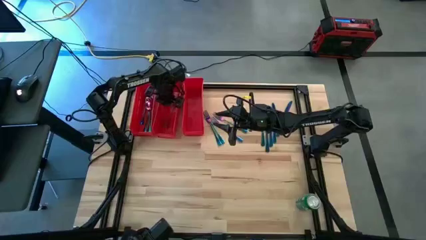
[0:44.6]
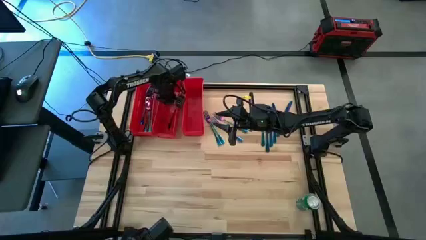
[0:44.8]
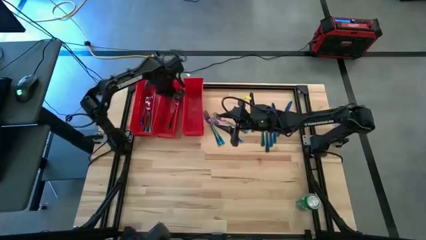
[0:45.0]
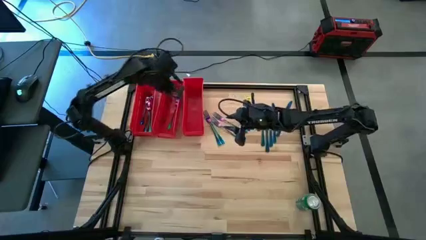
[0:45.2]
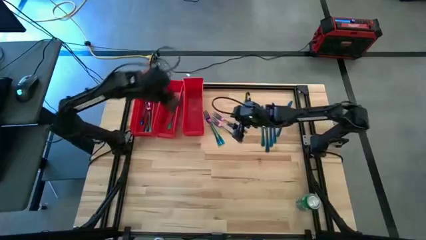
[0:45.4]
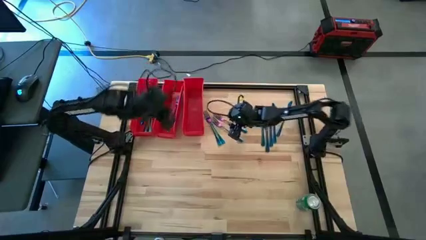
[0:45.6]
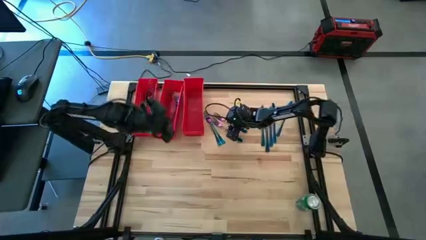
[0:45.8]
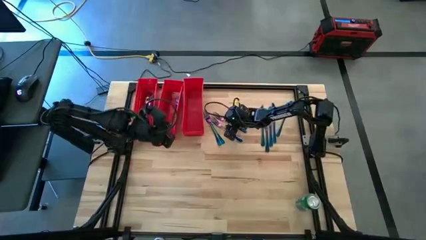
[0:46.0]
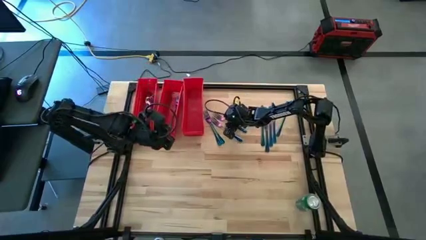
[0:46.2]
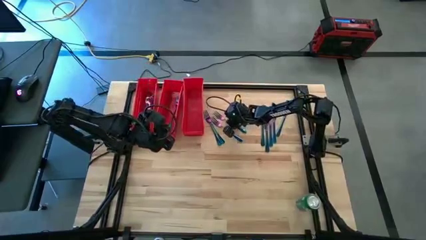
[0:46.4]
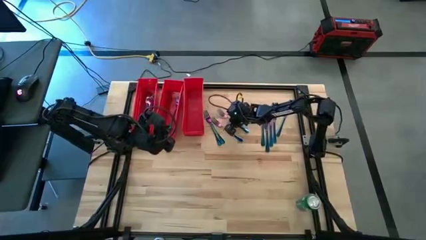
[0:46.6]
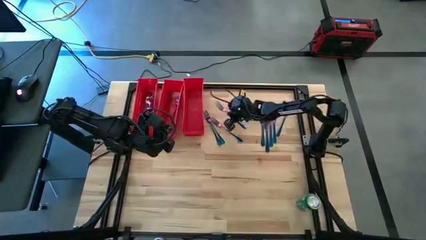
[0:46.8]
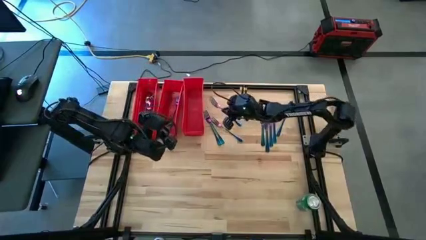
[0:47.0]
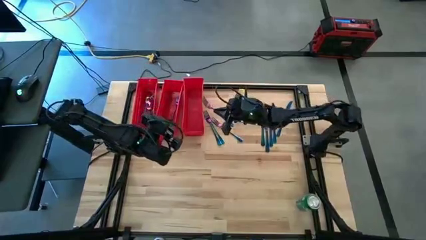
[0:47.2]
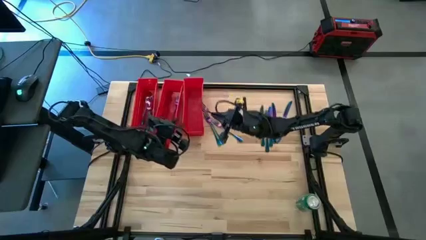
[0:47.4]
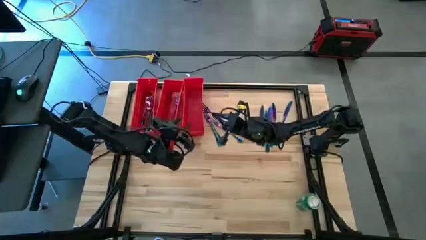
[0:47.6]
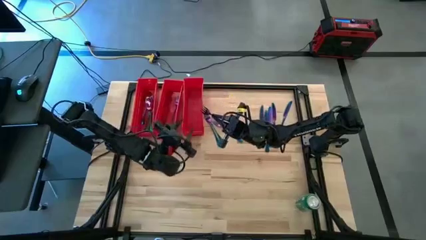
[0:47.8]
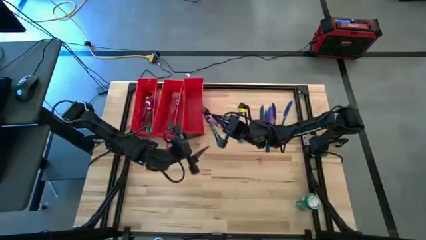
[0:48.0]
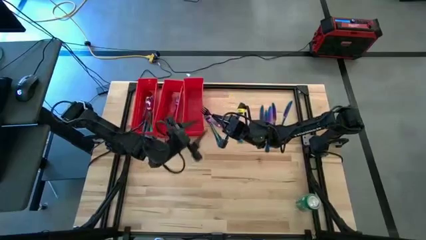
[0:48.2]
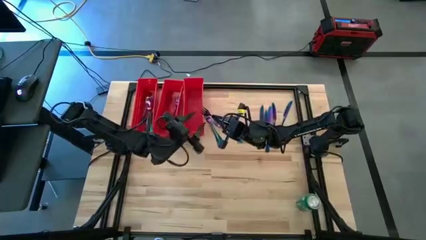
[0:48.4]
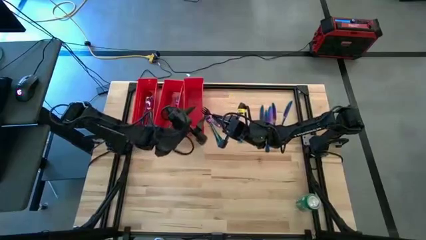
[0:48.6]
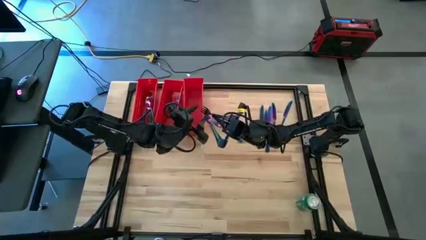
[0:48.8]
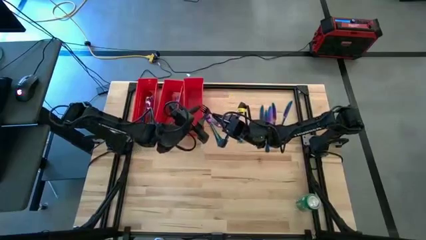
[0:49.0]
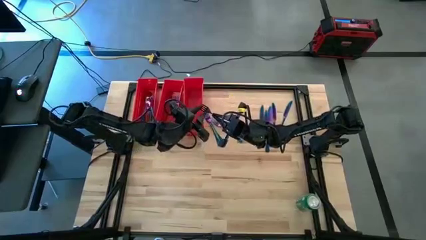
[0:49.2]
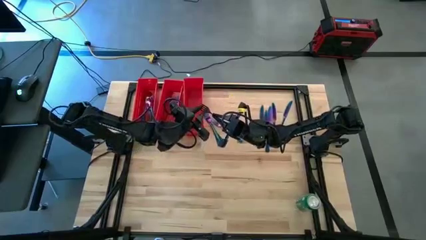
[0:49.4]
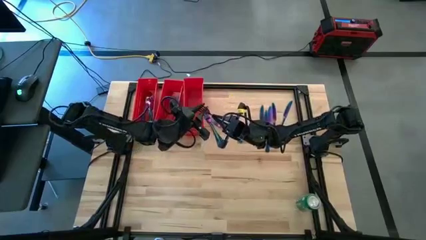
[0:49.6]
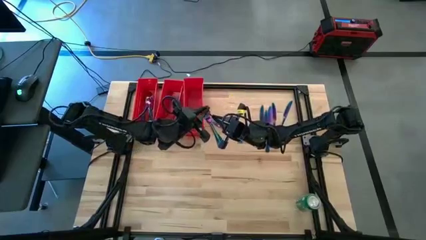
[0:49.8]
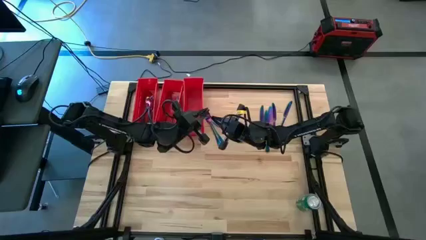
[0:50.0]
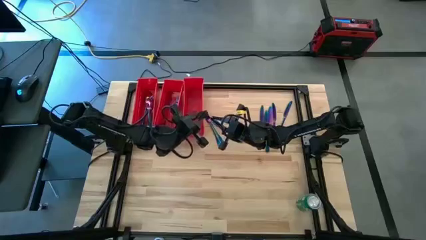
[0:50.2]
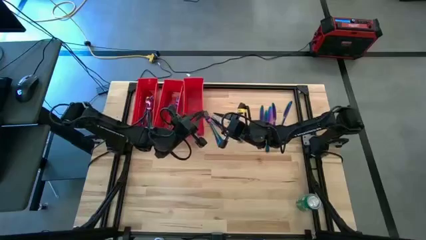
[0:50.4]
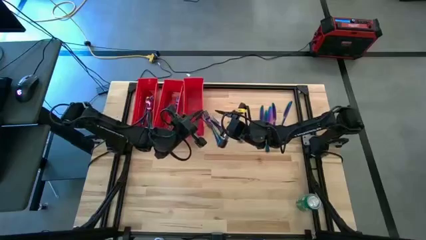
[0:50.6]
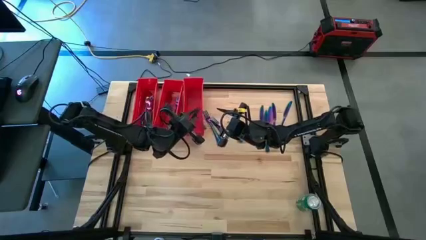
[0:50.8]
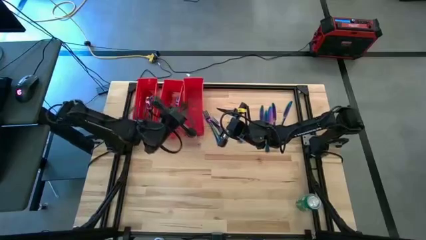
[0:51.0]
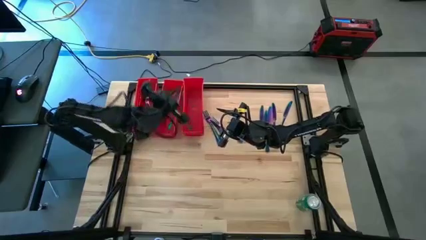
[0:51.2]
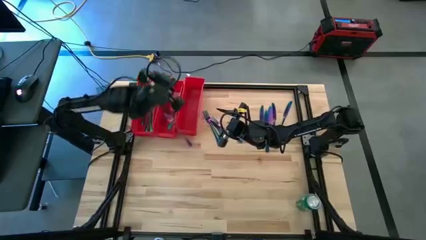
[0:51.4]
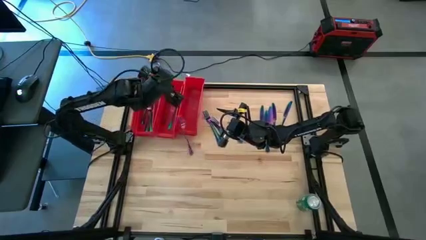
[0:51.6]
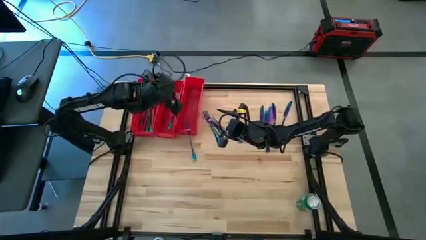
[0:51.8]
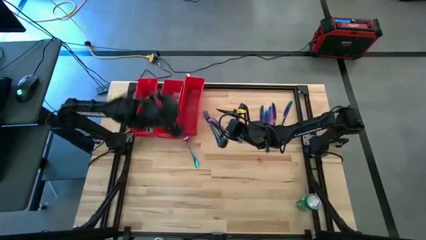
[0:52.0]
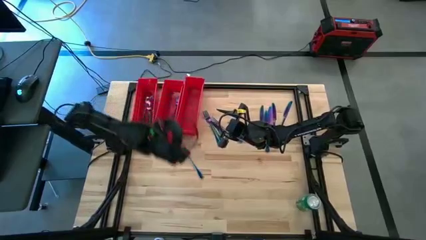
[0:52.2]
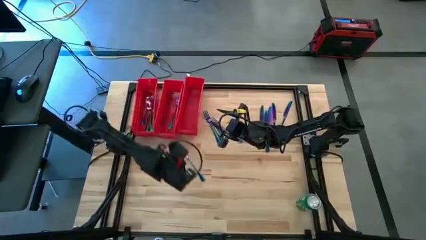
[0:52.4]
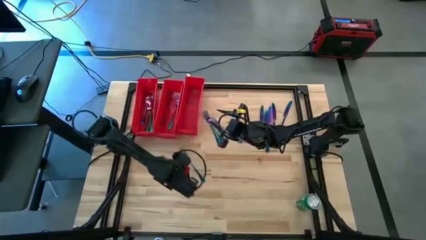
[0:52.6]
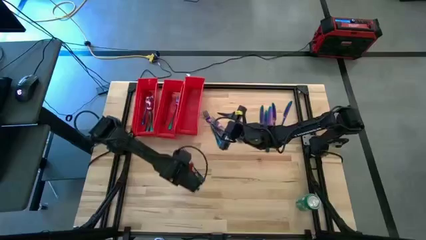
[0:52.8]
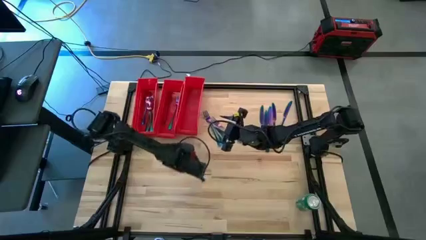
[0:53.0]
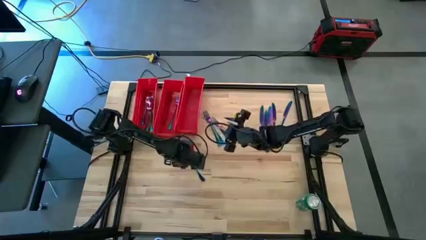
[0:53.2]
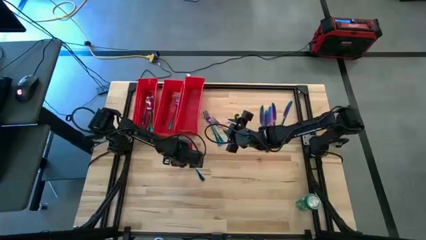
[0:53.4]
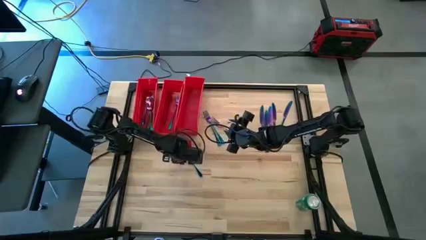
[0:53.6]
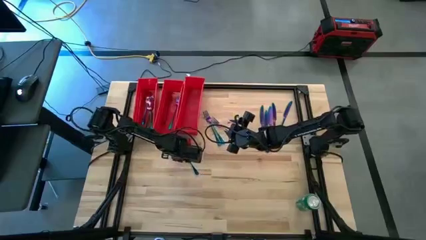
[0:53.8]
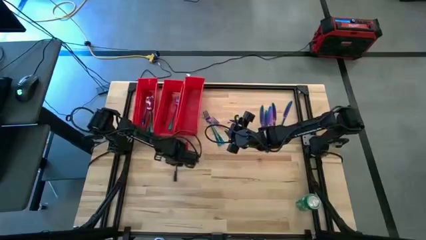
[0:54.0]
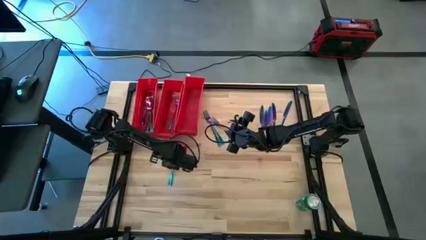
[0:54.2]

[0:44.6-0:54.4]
Task: Sort silverware
Put the blue fork into the middle red bin

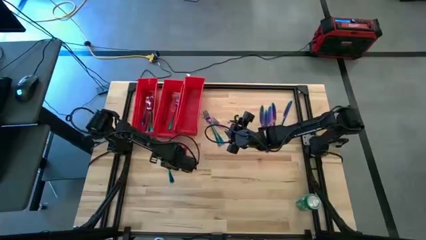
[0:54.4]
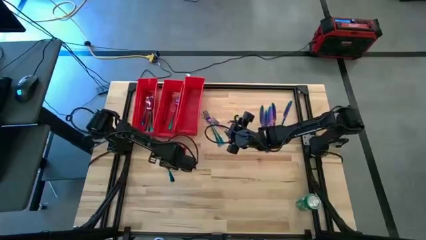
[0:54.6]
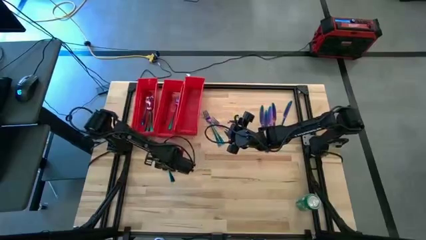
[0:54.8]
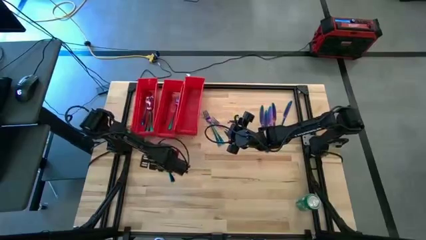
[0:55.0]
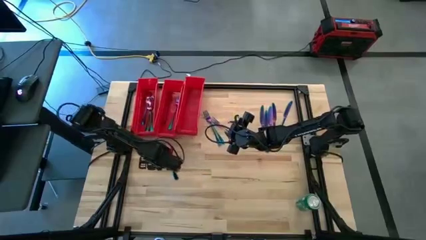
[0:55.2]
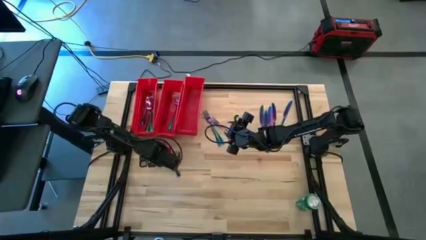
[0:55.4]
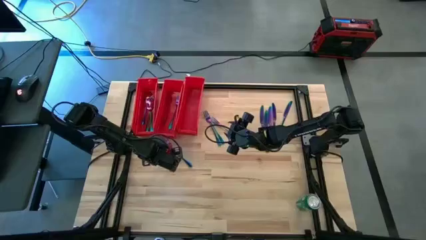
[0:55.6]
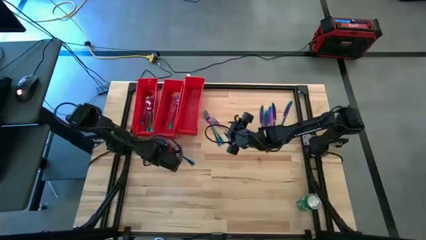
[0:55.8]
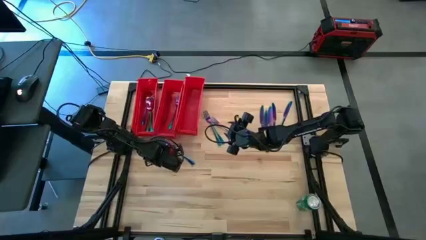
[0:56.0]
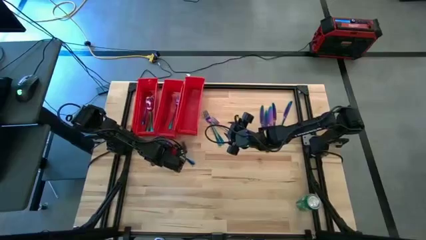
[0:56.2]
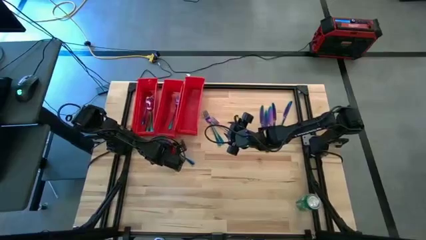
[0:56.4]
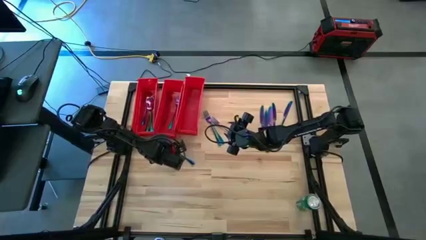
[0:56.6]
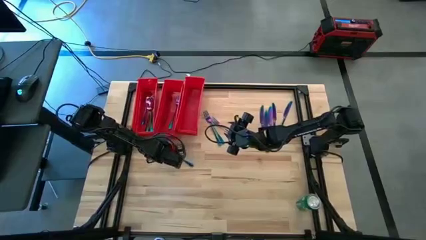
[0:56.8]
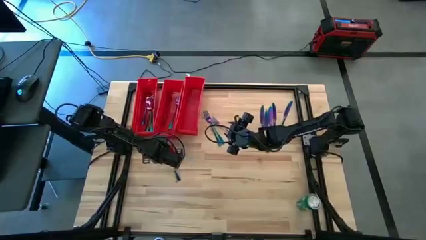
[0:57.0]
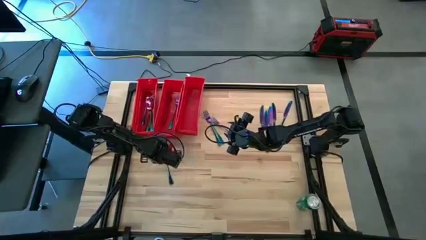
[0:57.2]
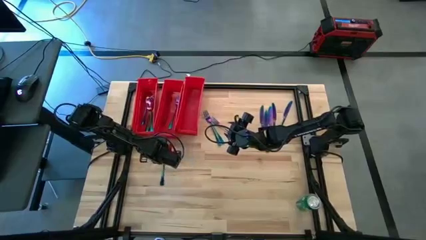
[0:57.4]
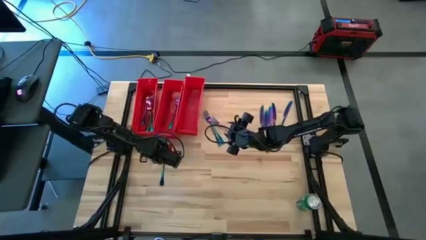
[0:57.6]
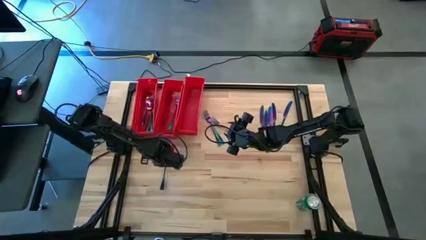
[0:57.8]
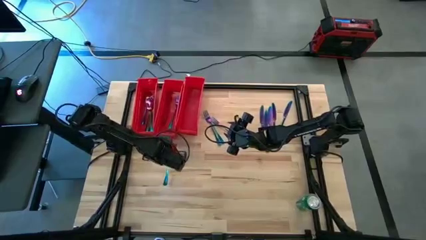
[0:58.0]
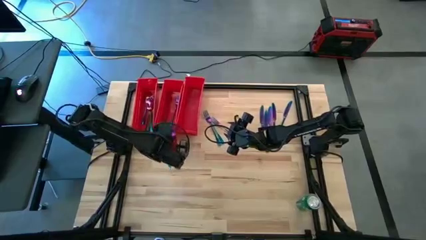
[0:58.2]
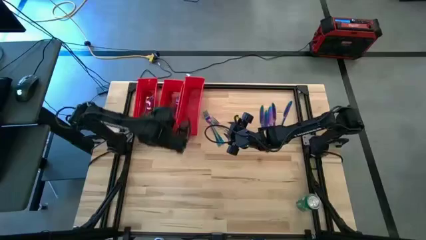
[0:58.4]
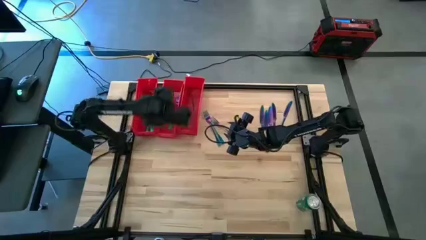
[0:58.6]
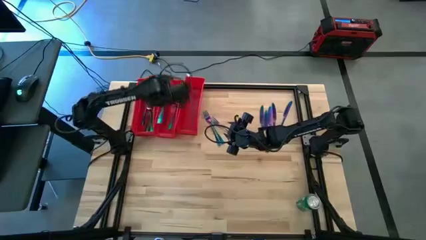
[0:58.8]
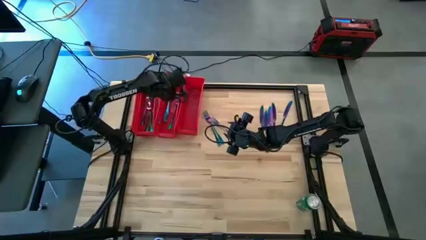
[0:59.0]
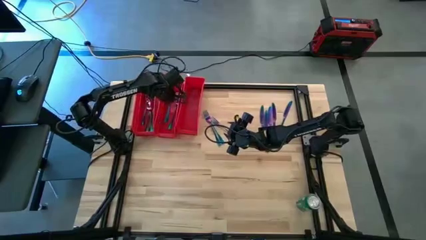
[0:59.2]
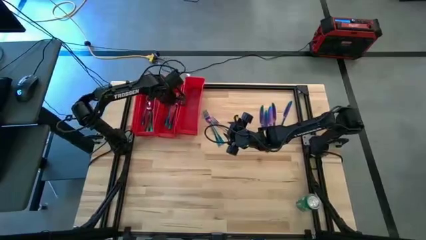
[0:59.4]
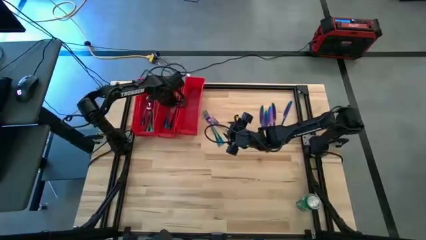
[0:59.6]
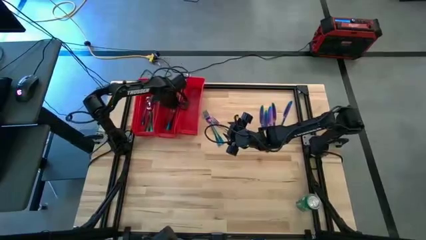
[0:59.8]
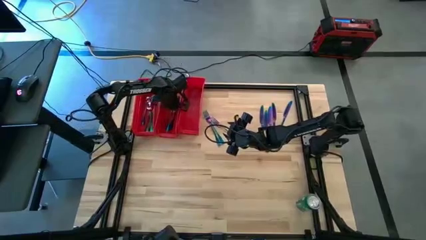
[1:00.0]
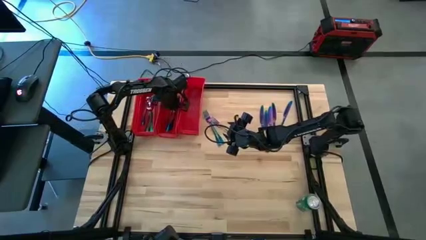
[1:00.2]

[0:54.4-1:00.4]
Put the blue fork into the middle red bin

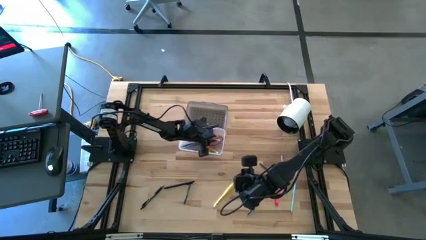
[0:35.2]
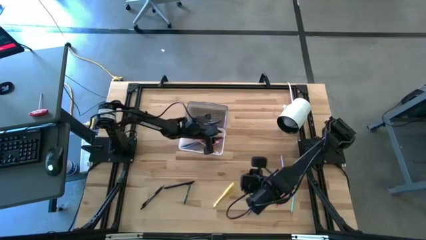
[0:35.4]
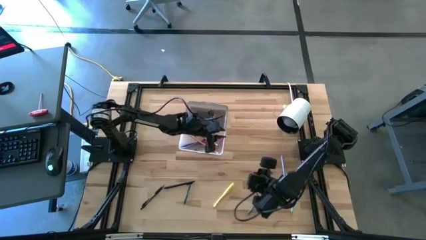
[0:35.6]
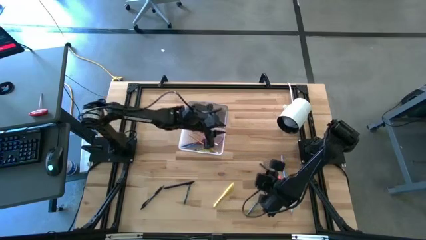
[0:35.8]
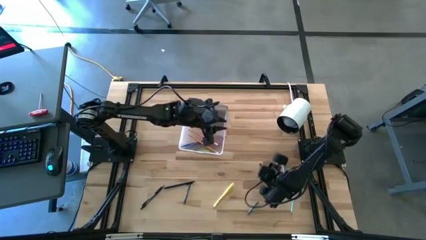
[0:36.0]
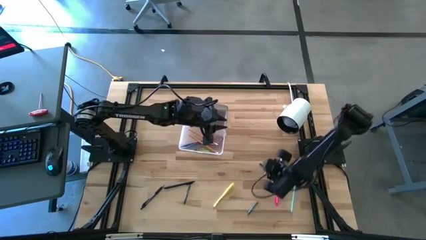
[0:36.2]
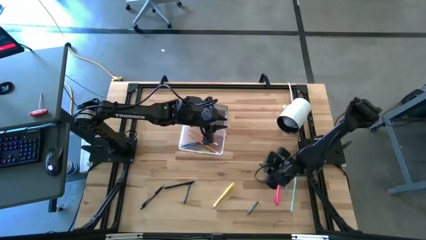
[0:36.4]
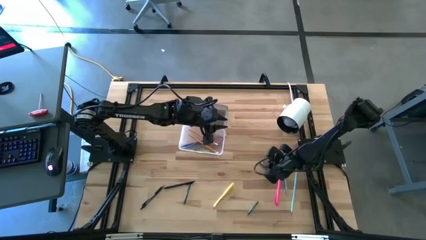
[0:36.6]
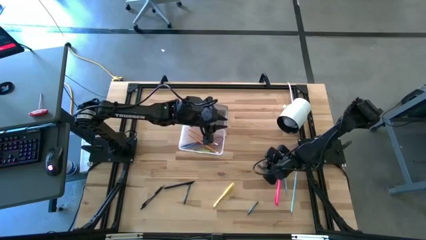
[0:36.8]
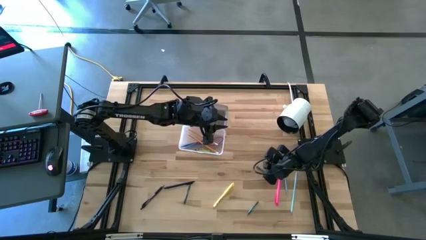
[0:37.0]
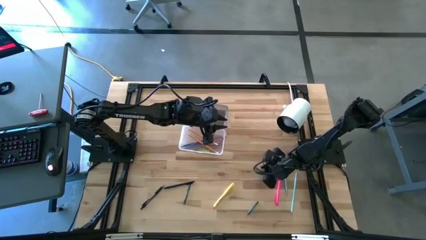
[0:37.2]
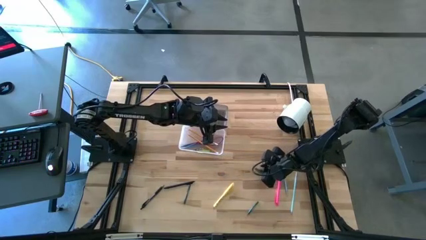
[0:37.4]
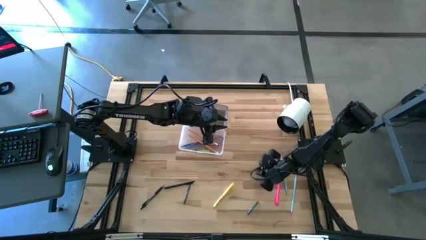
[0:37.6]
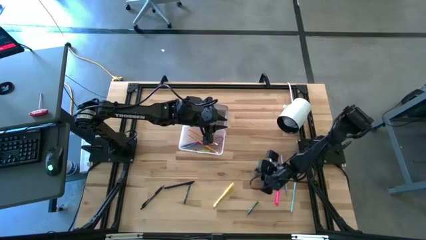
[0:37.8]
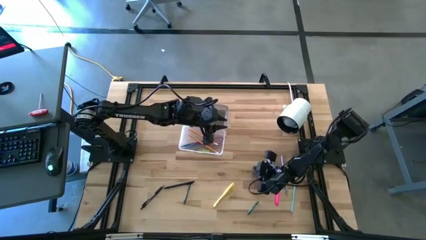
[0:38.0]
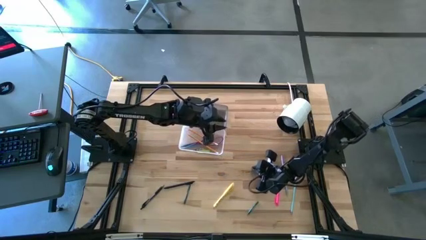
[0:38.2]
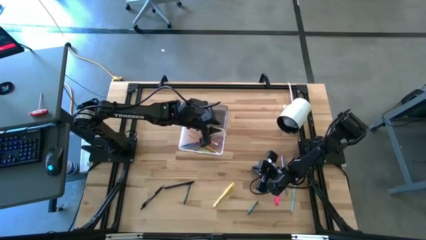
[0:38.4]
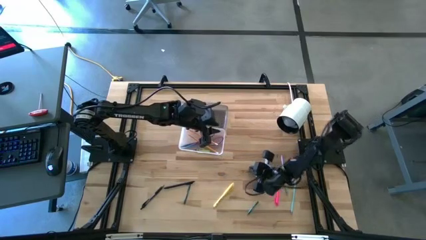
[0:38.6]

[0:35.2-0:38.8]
Task: Pick & place school supplies into a supply box
Put the top dark green crayon into the black box
